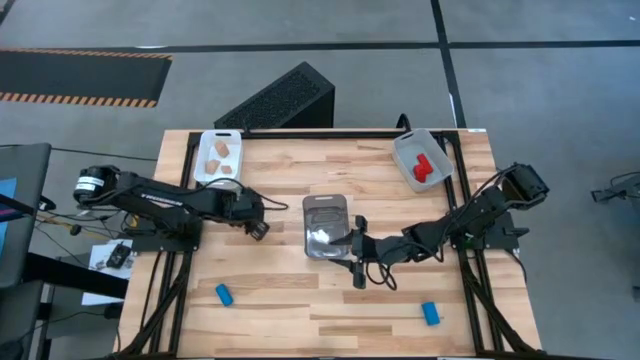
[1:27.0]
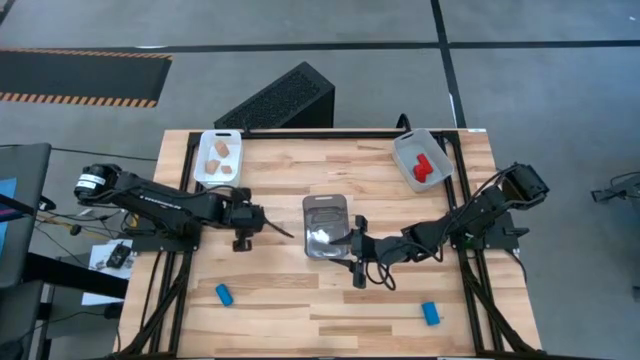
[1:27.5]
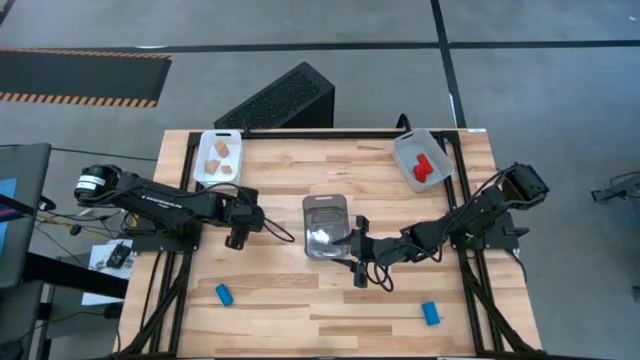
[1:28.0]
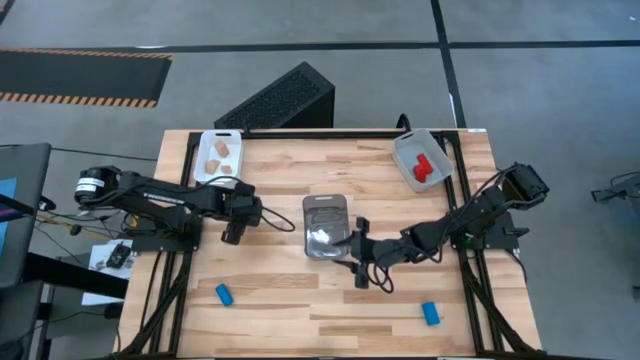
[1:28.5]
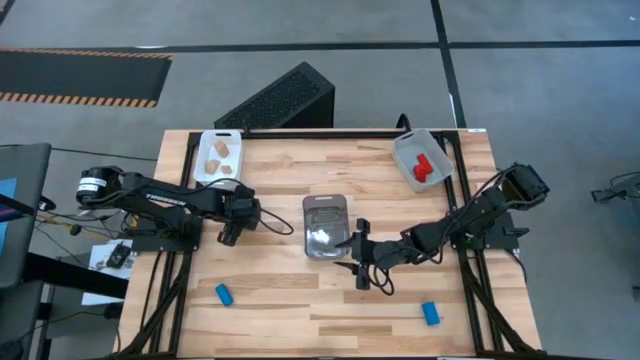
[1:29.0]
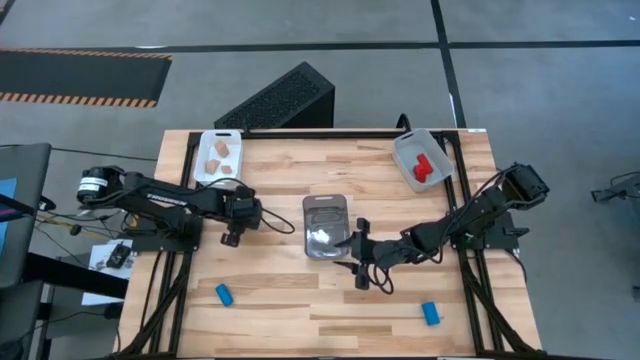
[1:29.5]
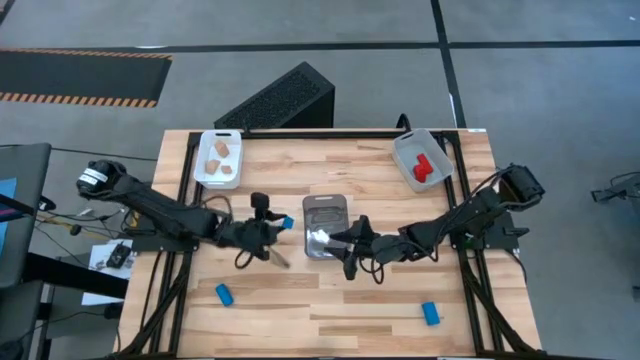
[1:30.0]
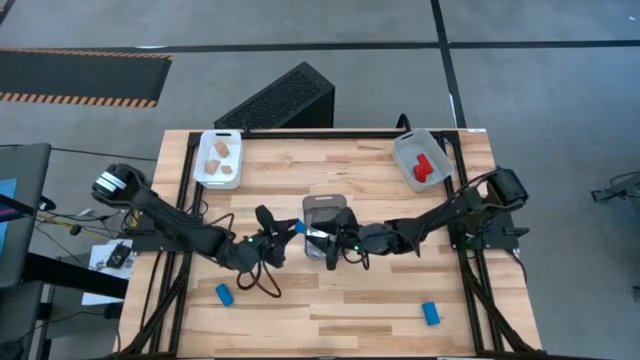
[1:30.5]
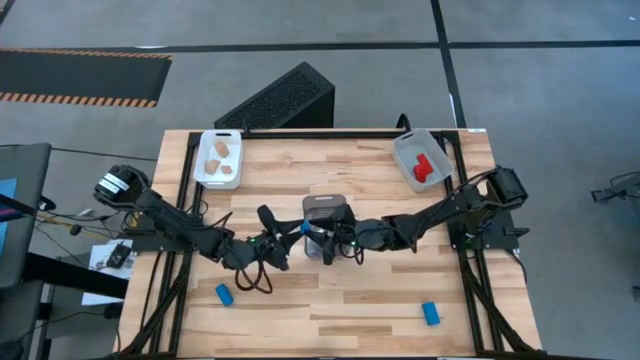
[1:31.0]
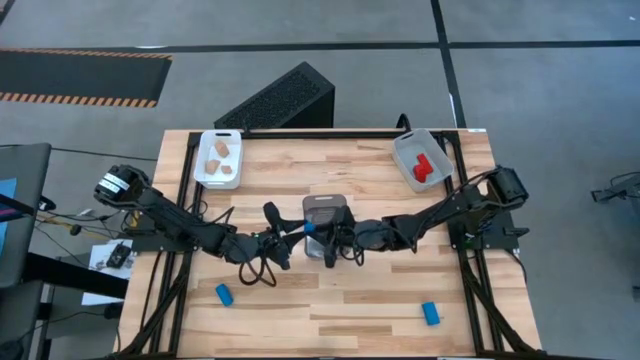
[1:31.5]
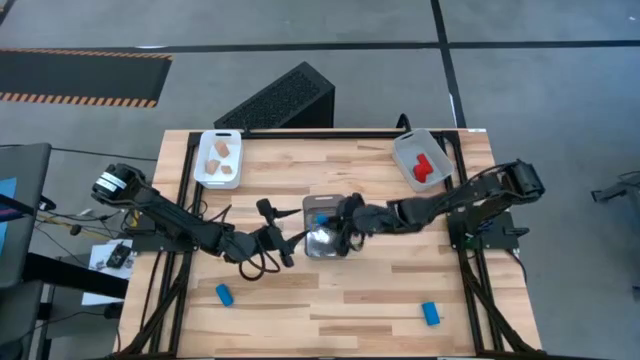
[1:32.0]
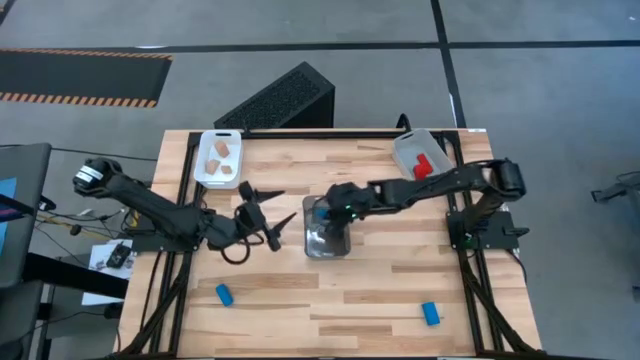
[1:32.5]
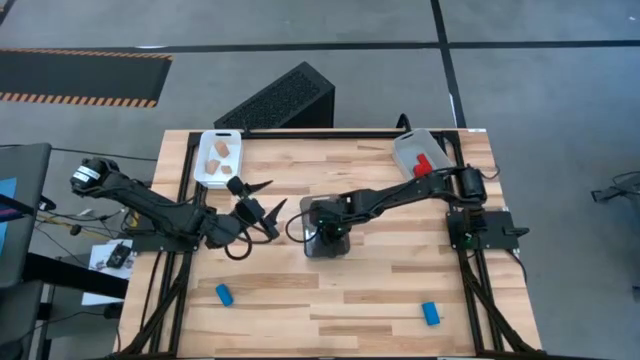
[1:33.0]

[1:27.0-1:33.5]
Task: Sort & place blocks by color
Put the top left blue block into the black bin

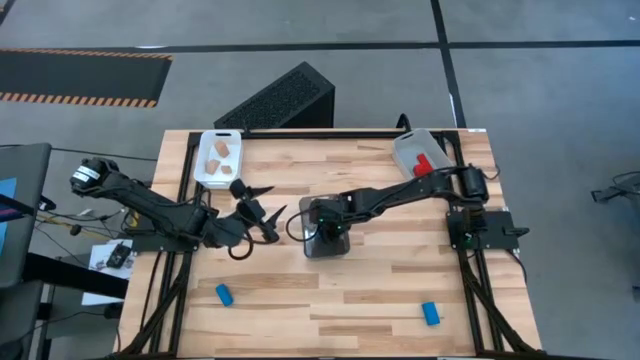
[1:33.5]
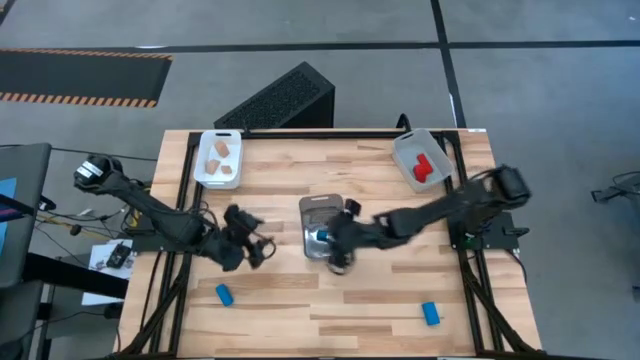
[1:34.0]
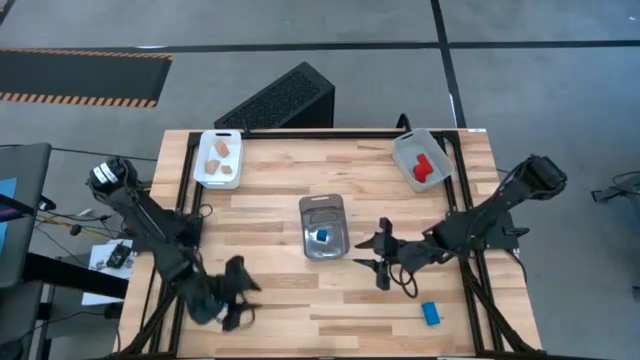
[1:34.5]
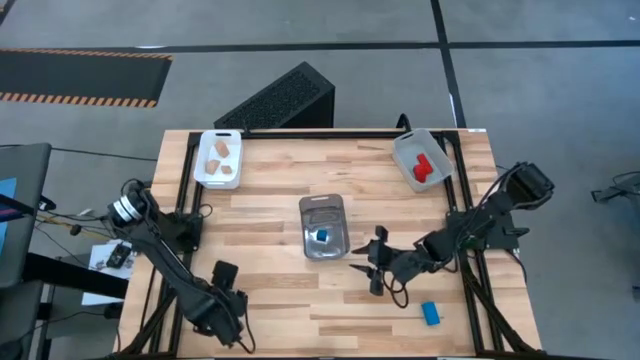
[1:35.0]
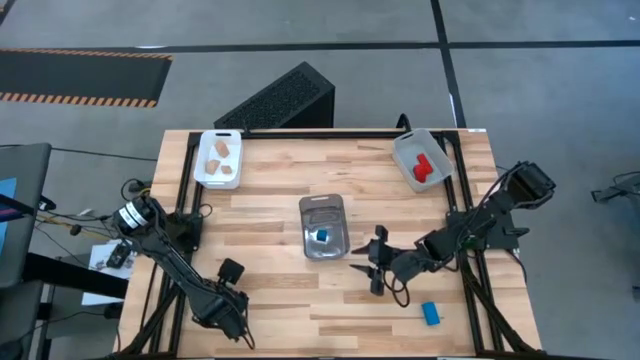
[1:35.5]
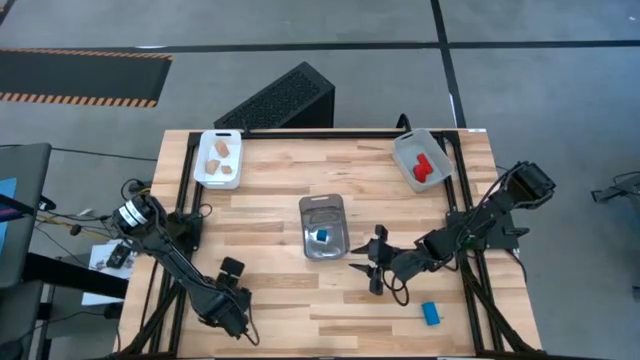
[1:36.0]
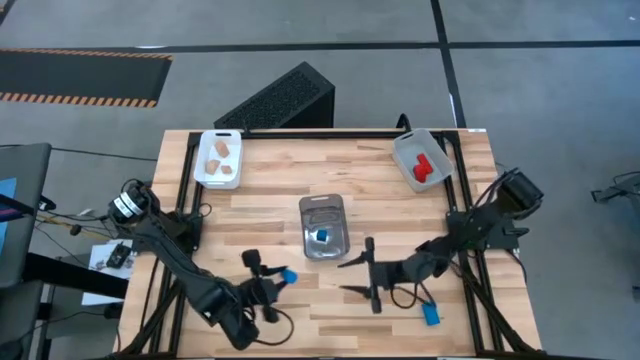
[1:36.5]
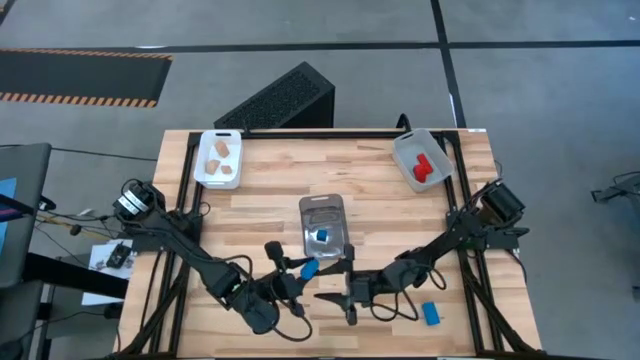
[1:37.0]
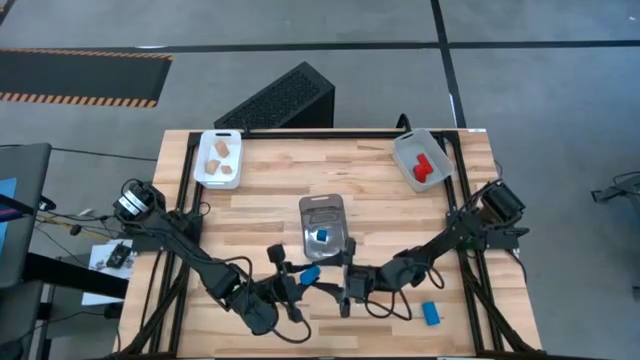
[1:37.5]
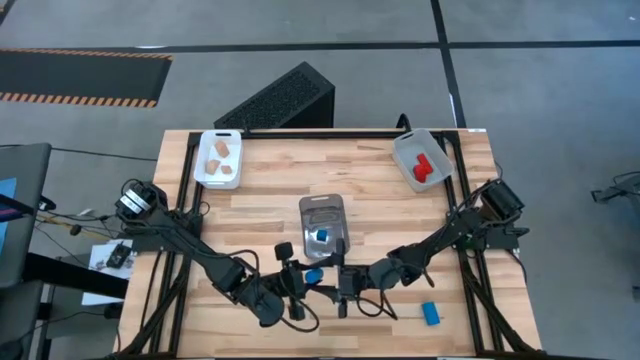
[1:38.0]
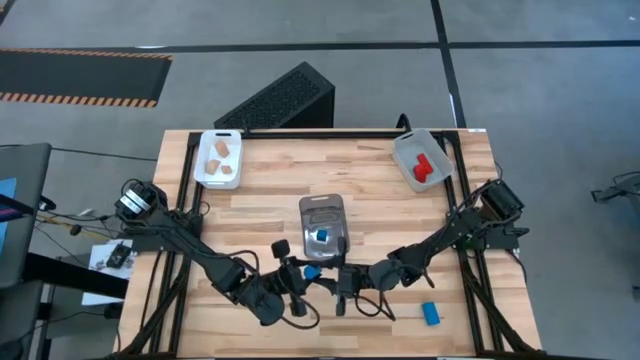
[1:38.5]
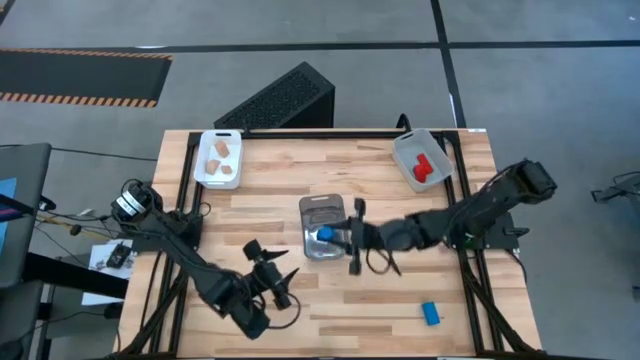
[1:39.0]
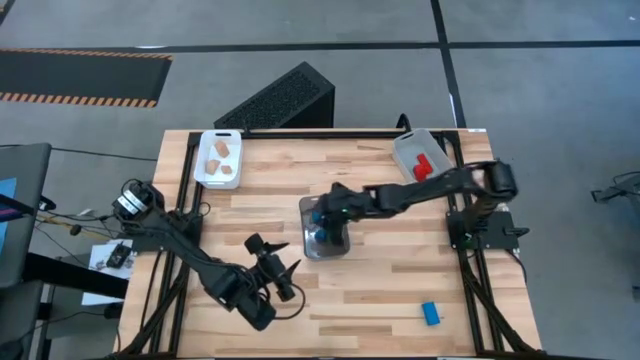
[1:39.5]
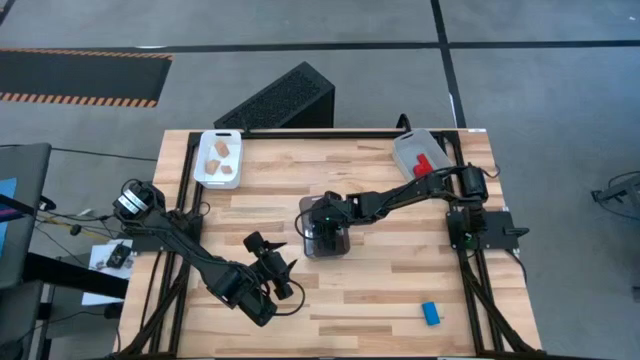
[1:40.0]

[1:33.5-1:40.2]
Put the left blue block into the black bin

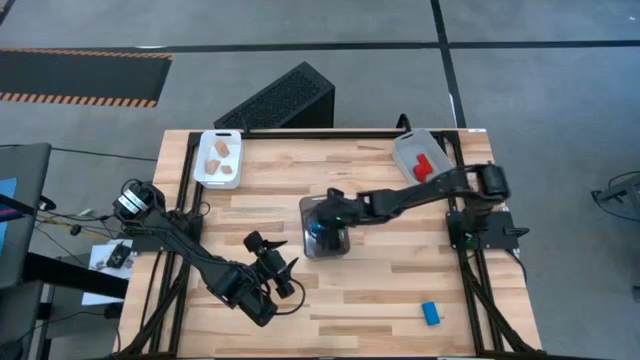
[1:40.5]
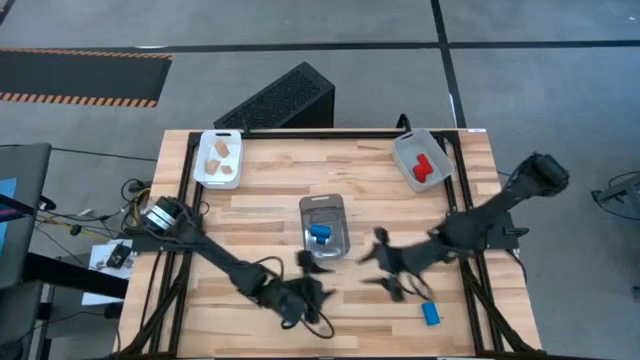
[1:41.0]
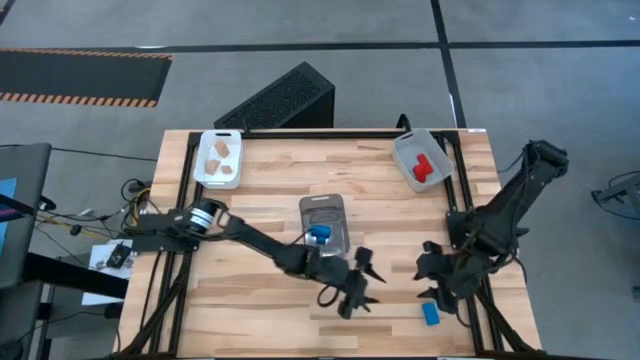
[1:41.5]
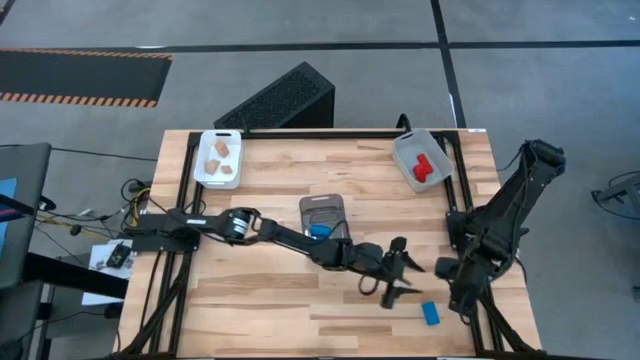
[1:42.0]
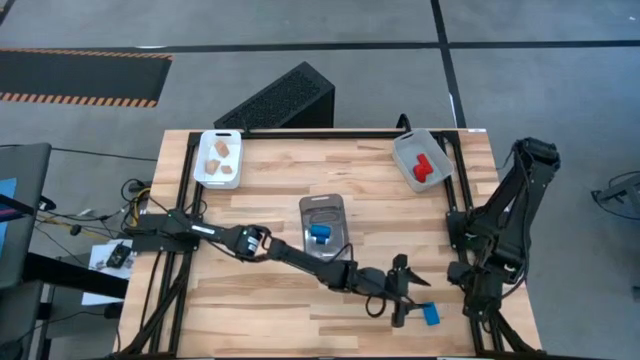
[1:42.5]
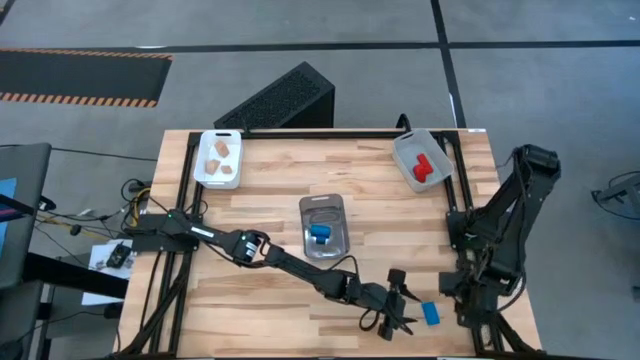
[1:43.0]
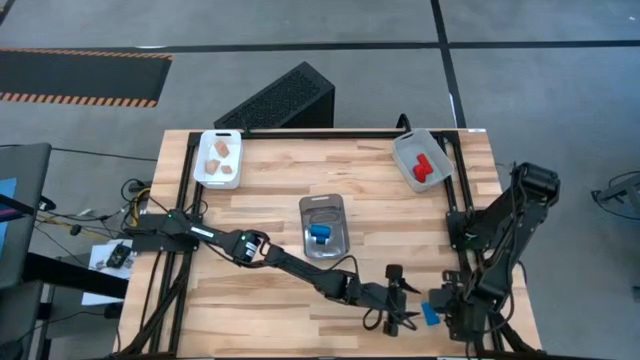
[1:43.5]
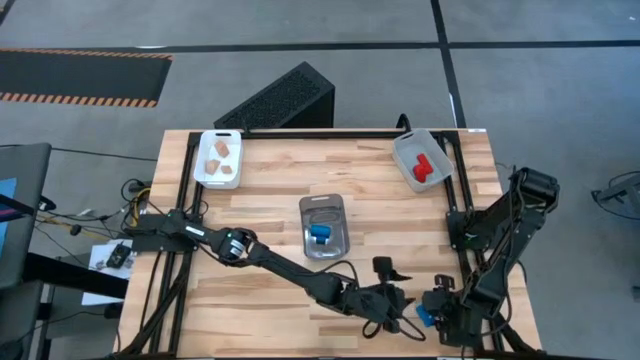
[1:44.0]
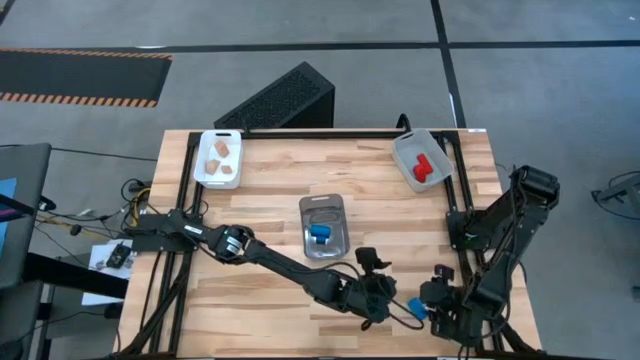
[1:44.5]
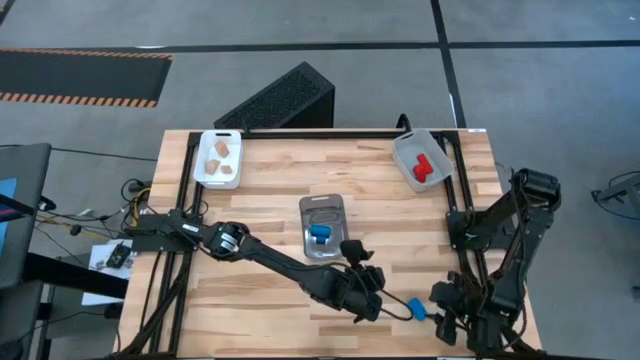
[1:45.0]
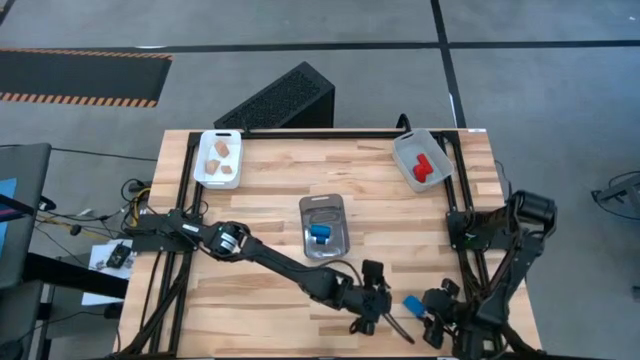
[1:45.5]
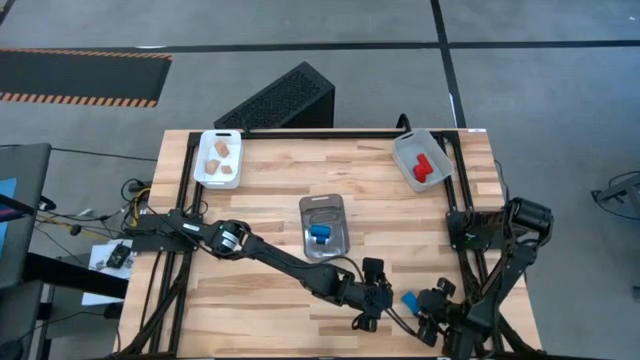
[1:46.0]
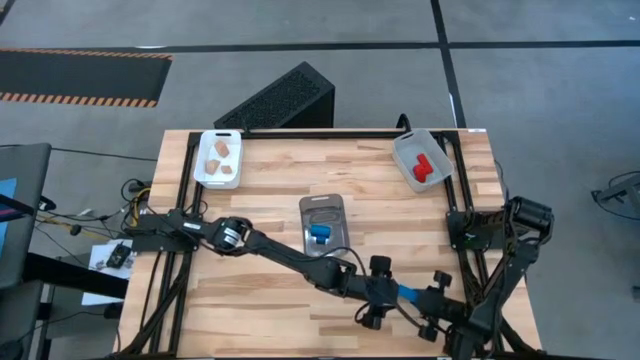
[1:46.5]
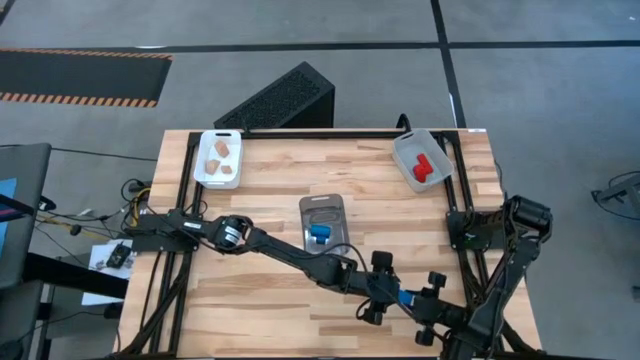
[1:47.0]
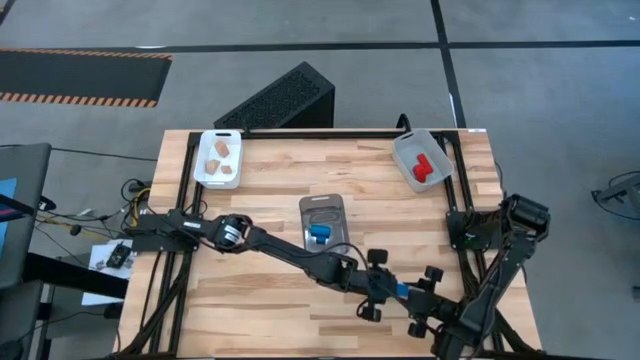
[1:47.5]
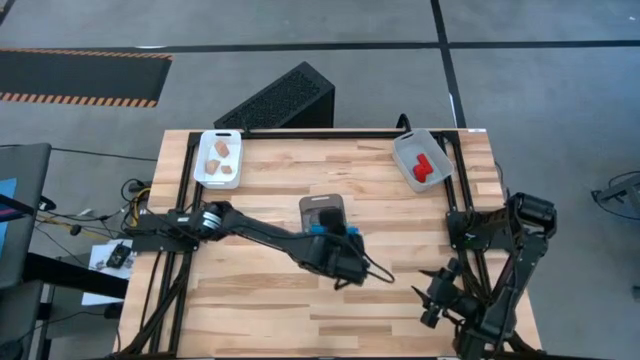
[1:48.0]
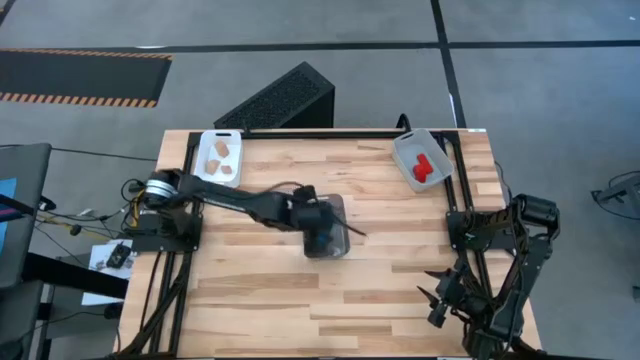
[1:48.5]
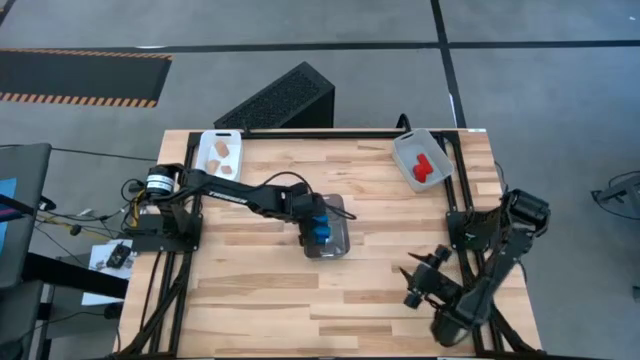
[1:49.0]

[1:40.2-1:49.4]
Put the blue block into the black bin
